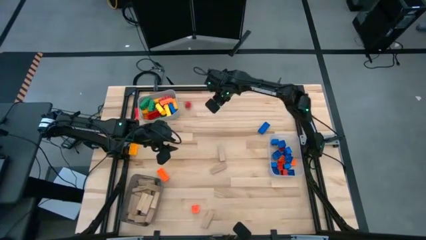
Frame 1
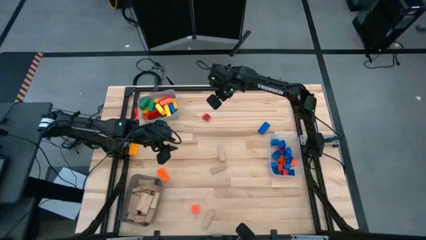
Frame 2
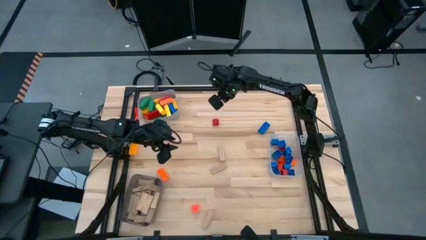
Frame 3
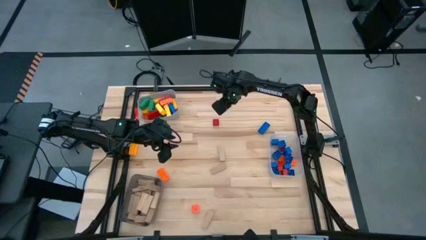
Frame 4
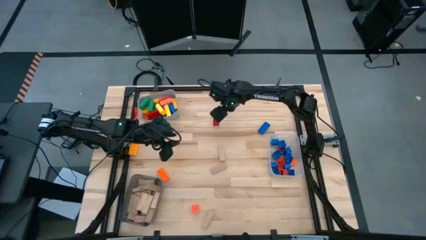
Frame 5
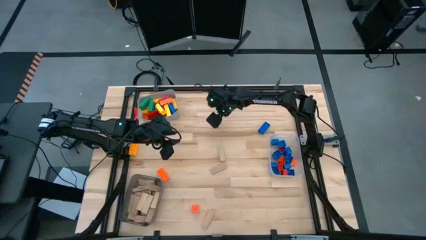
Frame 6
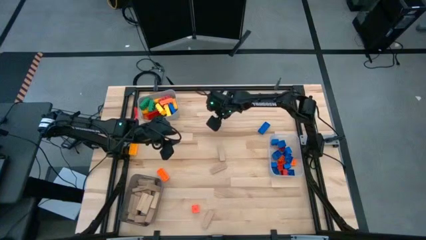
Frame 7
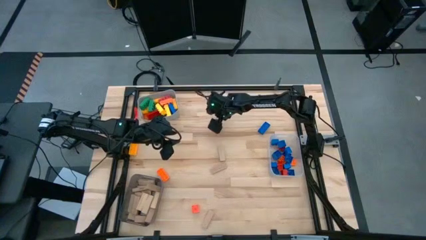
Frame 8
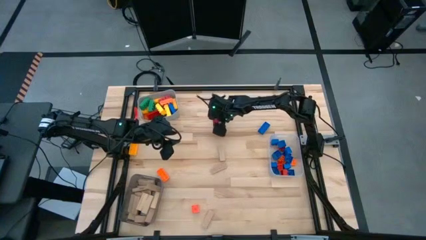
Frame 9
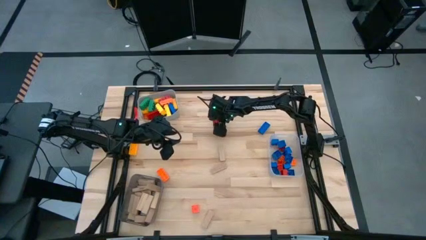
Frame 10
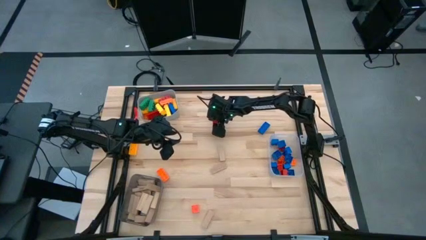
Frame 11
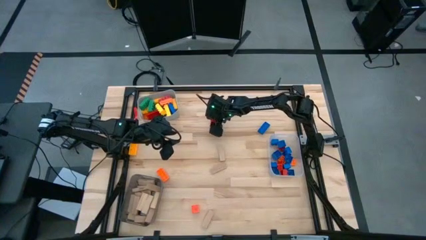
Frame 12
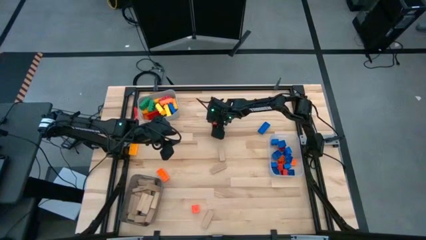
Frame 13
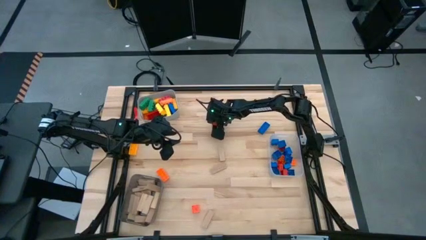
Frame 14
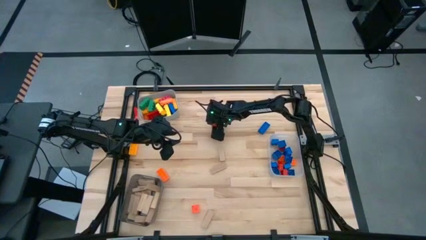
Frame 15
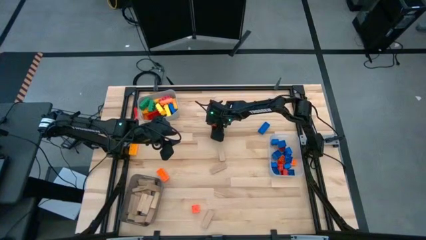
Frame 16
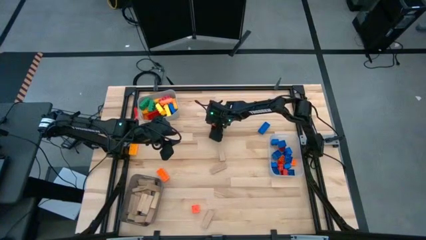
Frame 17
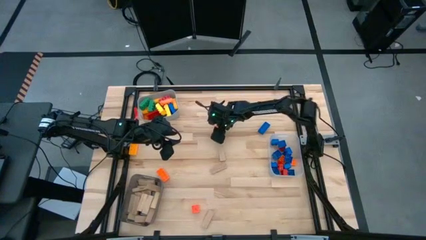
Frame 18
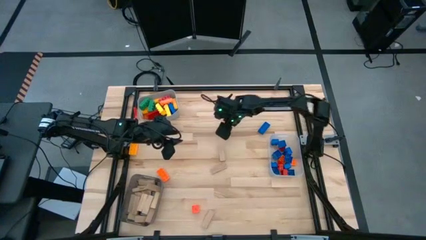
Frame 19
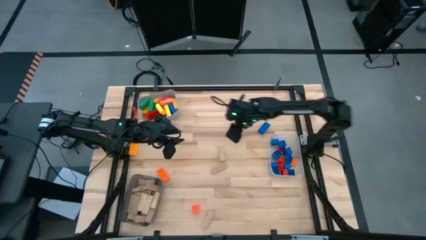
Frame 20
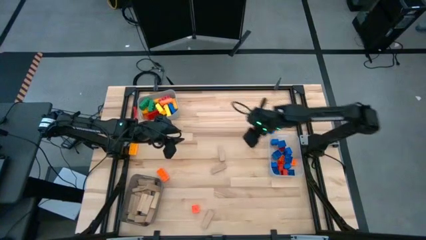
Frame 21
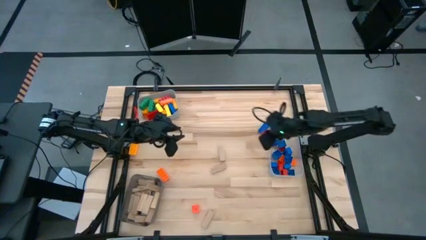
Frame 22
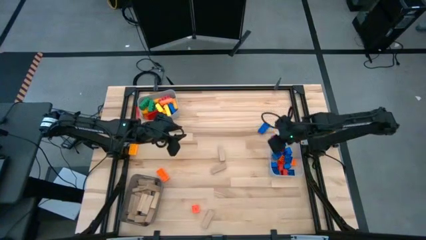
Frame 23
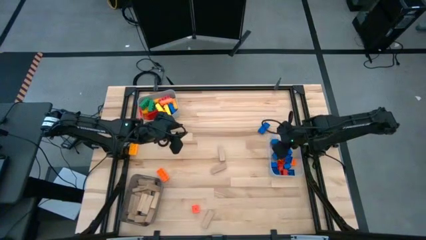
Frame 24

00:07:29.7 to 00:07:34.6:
Task: Sort blocks by size
Put the small red game piece into the transparent bin

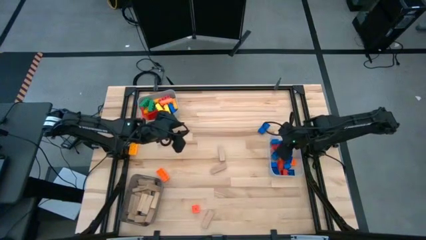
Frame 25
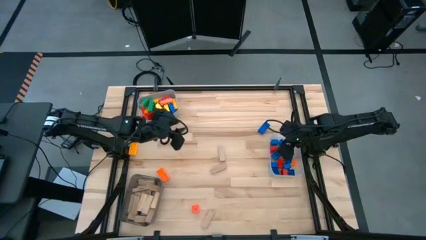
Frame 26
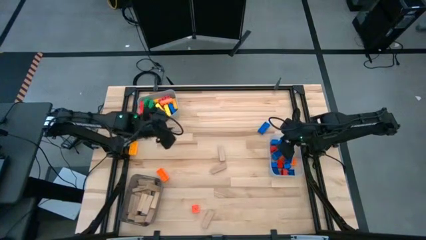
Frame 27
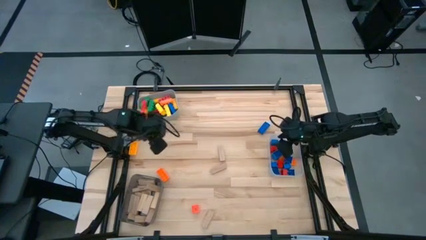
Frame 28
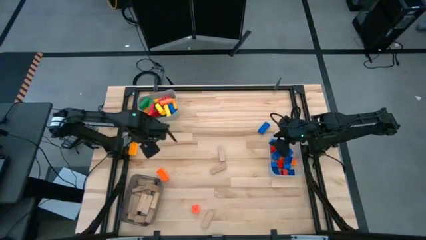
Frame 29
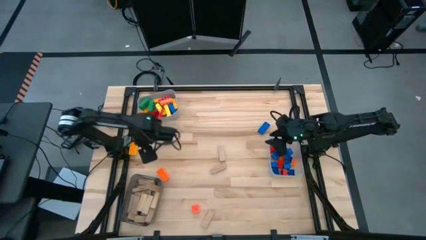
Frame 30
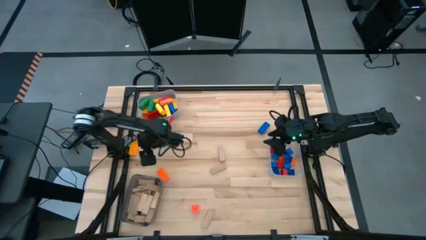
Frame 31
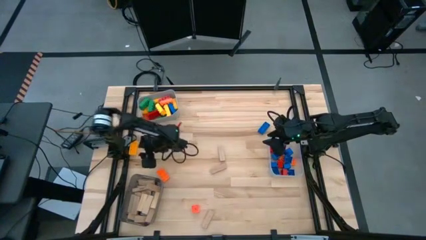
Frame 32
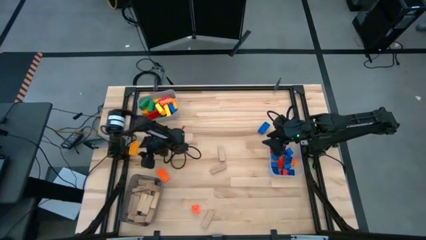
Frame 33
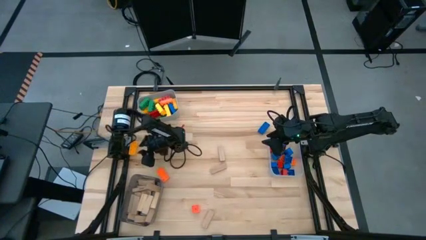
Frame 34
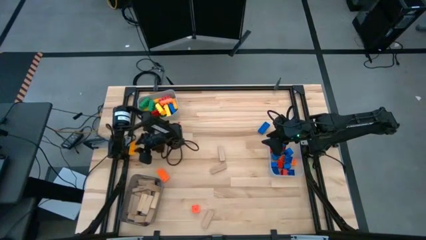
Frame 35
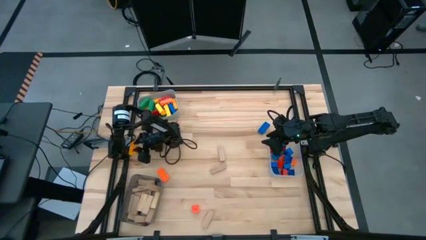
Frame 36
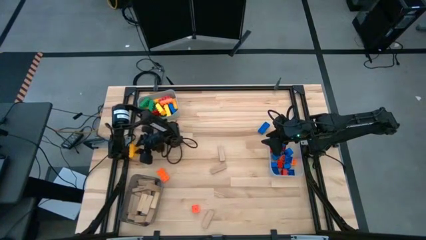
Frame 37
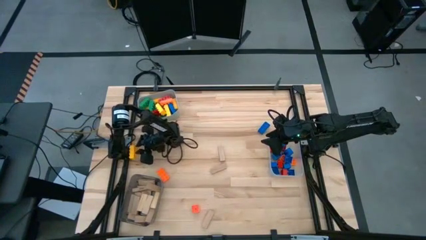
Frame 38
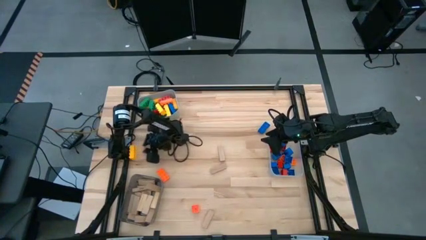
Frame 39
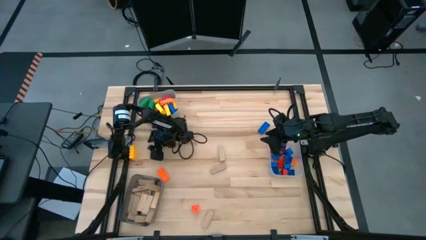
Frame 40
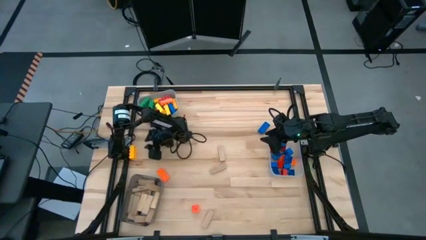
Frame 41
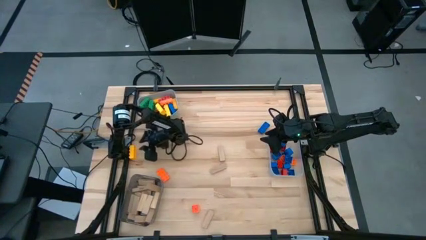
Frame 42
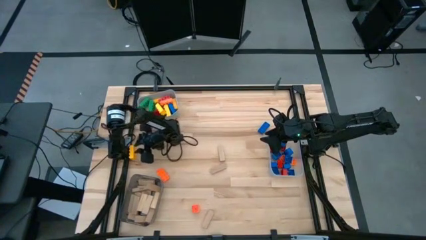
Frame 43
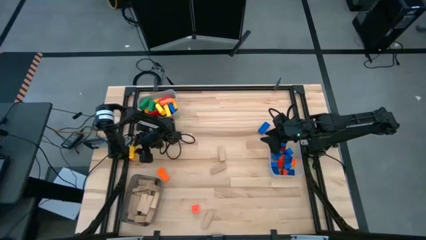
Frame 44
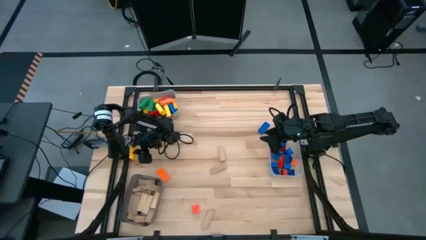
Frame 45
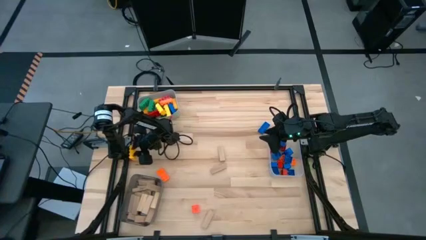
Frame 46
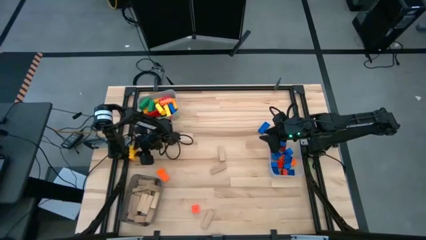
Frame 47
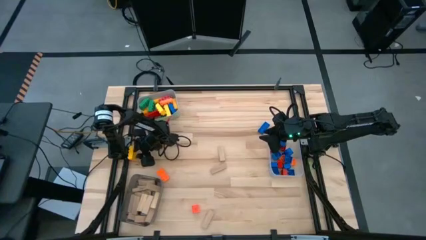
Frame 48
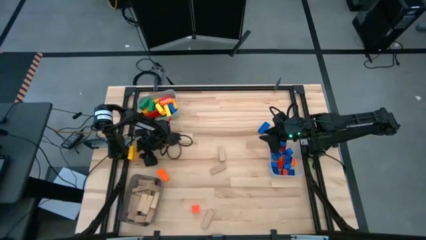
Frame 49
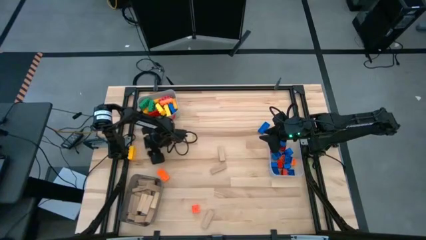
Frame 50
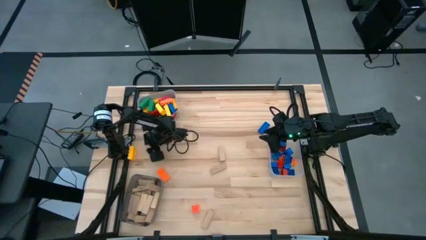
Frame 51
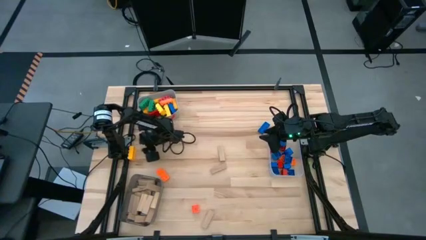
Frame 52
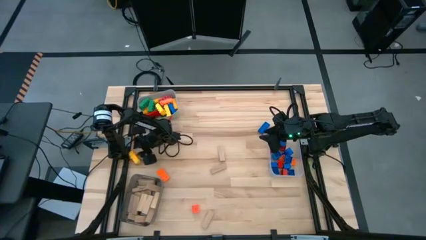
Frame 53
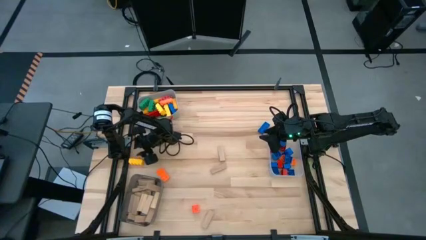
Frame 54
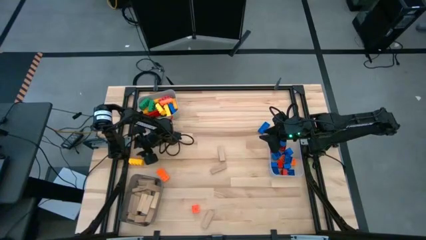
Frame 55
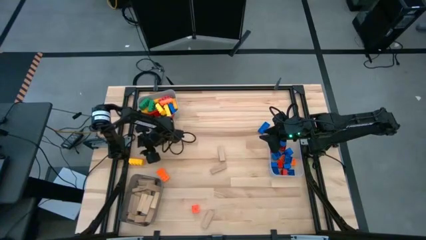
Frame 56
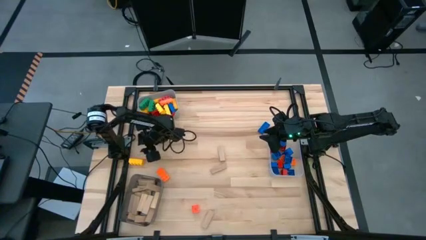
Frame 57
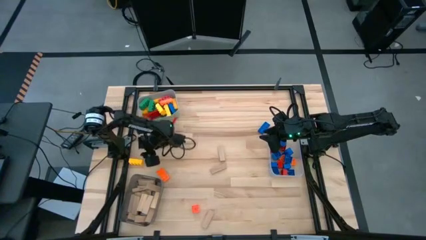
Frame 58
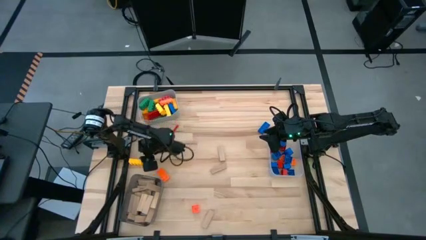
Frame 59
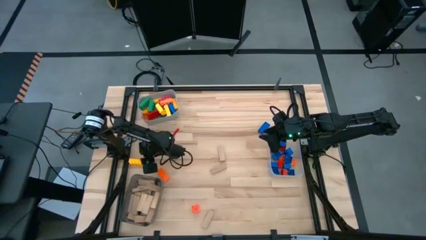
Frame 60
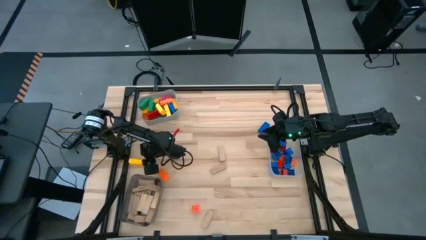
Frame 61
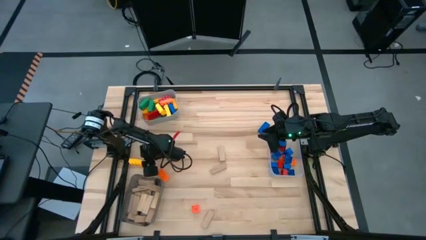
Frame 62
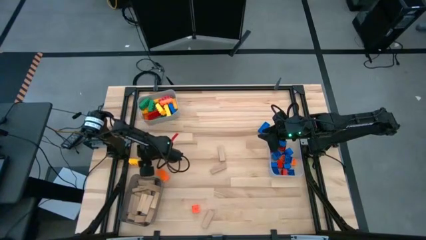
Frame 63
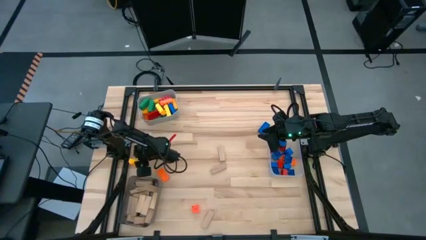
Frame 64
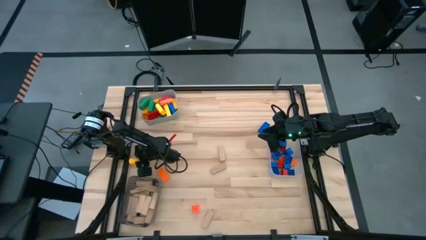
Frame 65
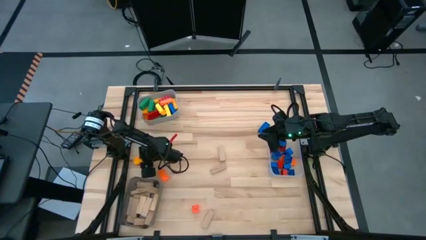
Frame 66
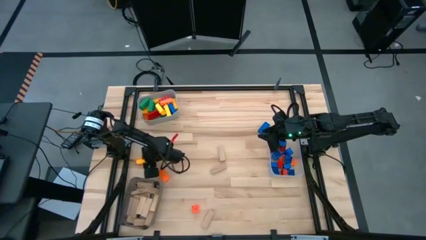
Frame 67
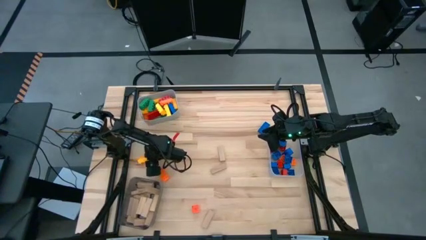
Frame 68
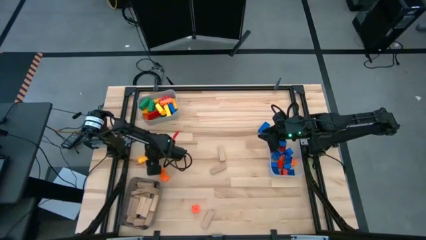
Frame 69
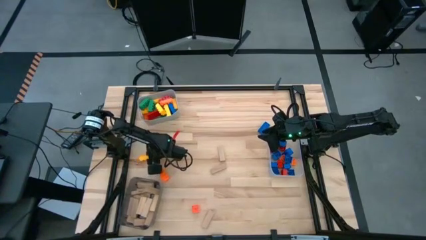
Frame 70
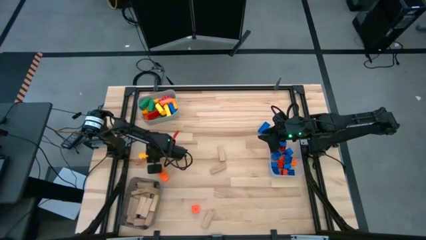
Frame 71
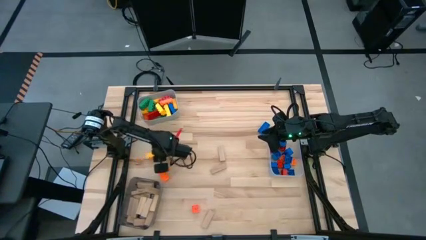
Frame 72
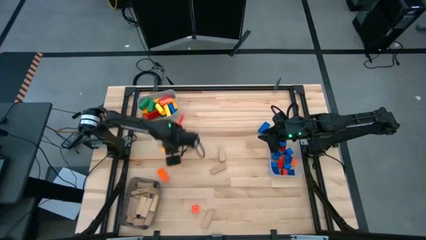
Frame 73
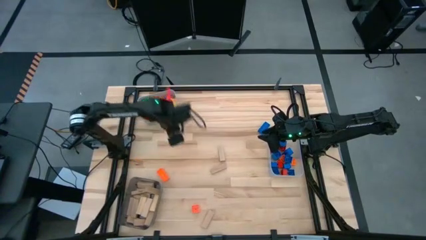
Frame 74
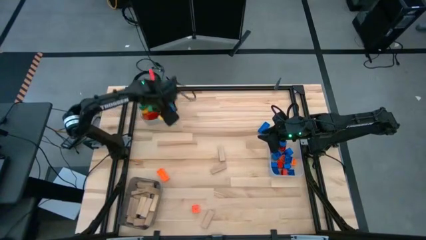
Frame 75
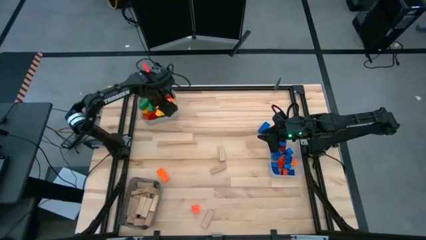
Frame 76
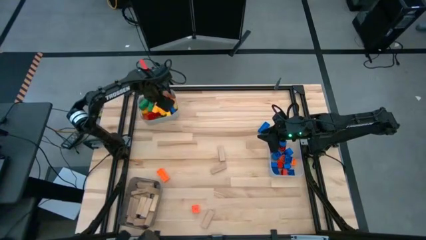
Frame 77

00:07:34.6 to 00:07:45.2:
Put the large yellow game piece into the gray bin
